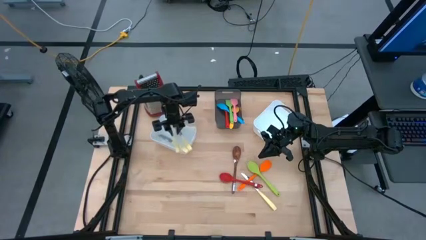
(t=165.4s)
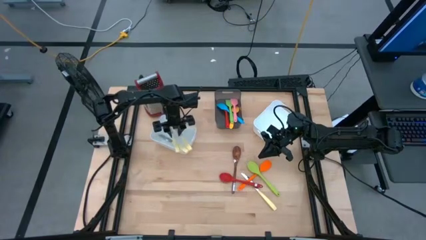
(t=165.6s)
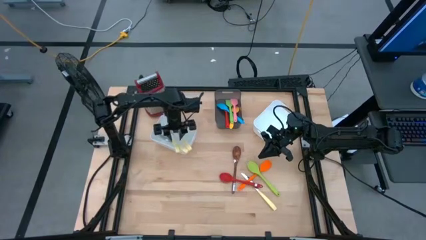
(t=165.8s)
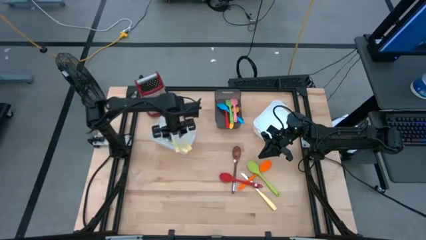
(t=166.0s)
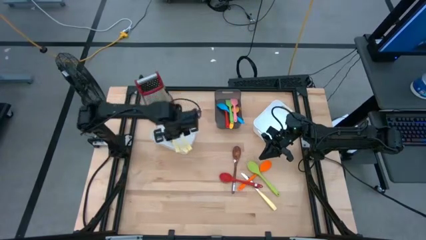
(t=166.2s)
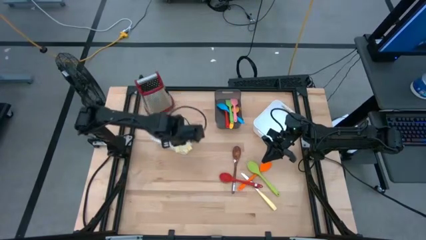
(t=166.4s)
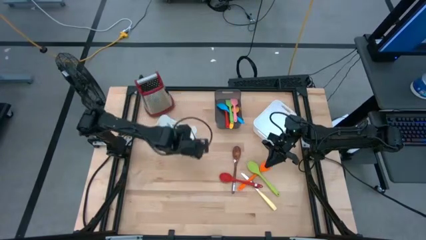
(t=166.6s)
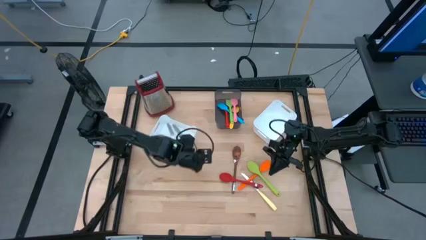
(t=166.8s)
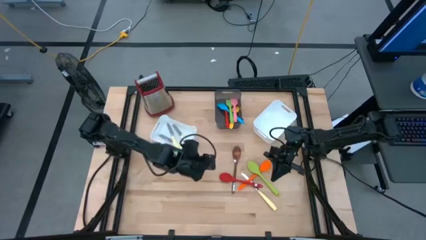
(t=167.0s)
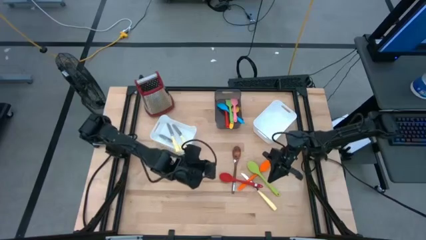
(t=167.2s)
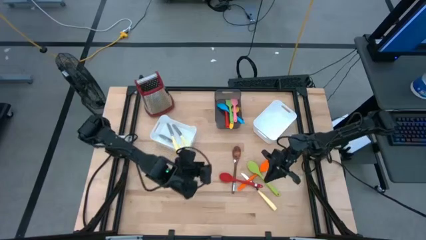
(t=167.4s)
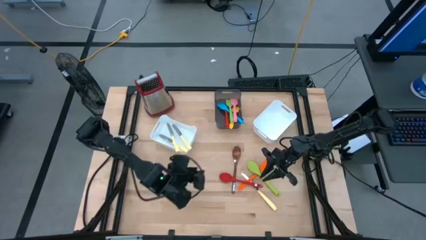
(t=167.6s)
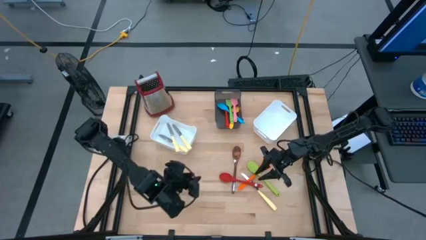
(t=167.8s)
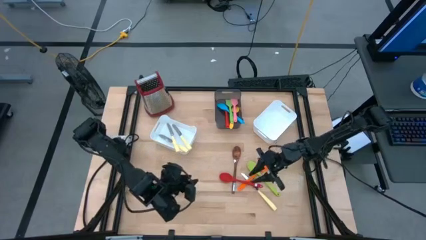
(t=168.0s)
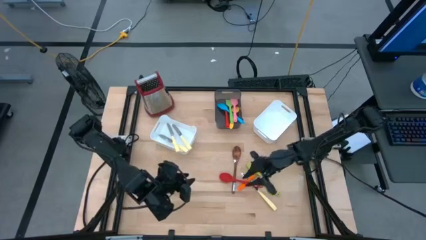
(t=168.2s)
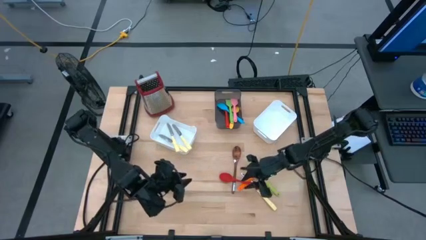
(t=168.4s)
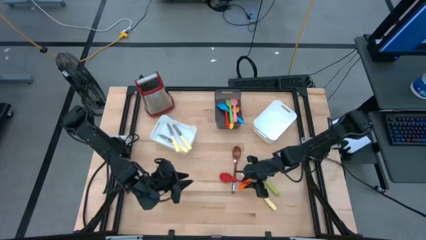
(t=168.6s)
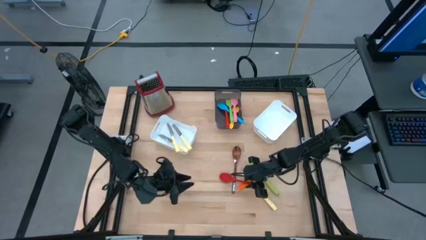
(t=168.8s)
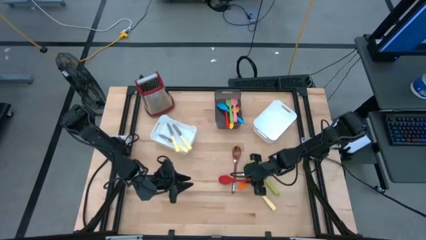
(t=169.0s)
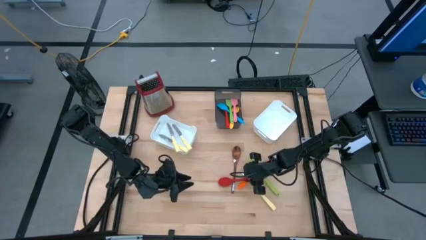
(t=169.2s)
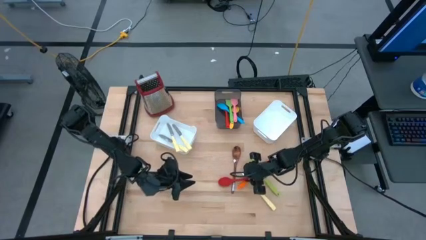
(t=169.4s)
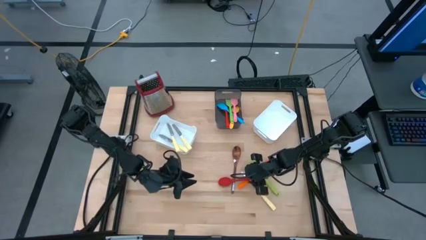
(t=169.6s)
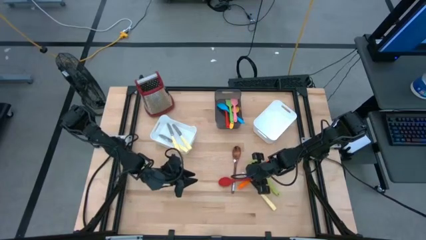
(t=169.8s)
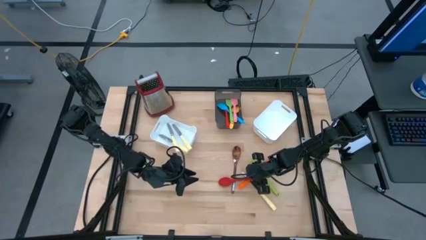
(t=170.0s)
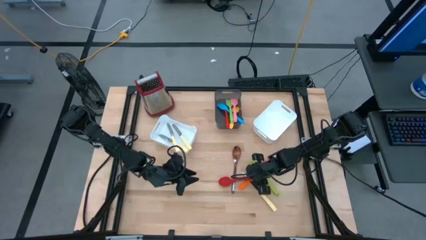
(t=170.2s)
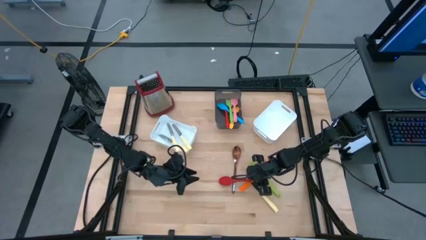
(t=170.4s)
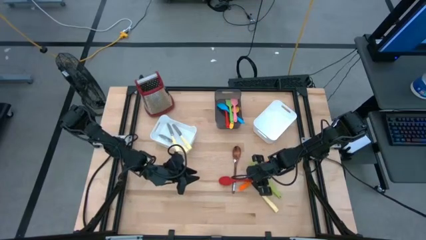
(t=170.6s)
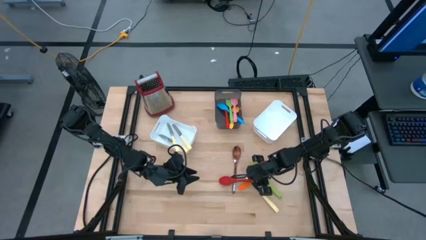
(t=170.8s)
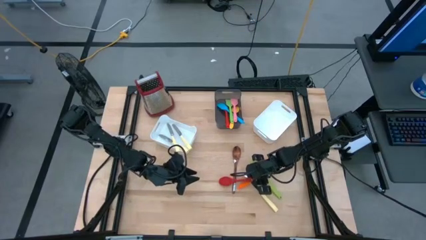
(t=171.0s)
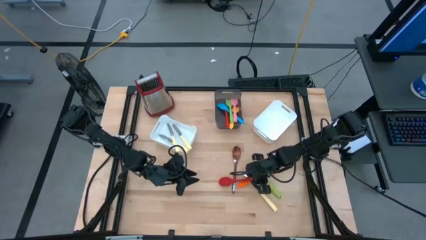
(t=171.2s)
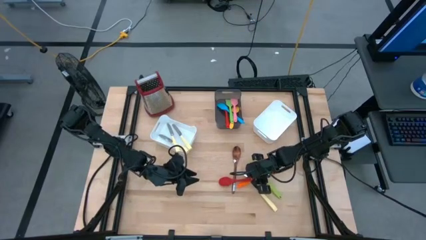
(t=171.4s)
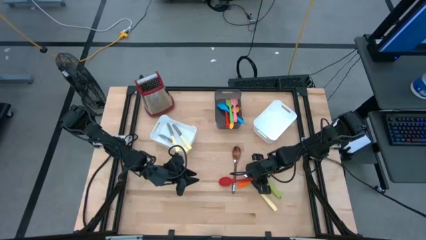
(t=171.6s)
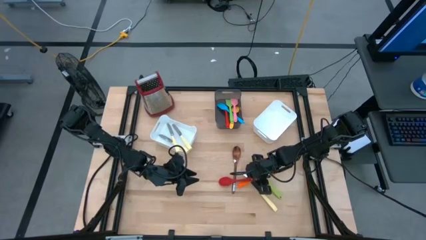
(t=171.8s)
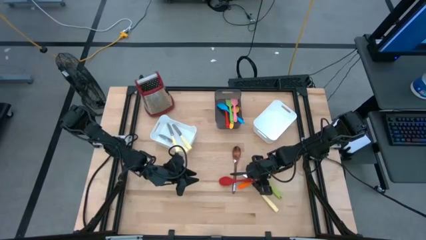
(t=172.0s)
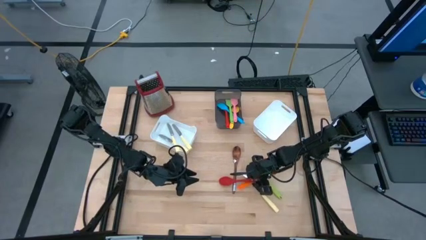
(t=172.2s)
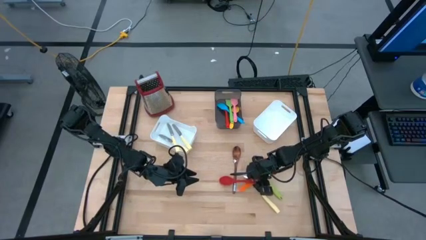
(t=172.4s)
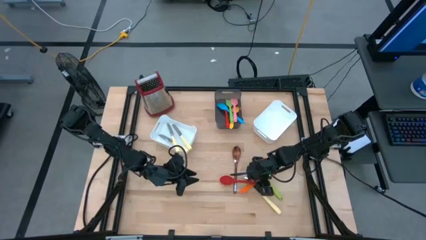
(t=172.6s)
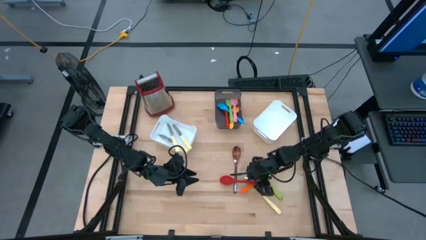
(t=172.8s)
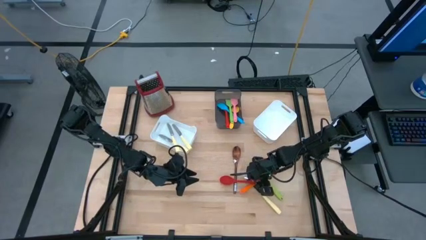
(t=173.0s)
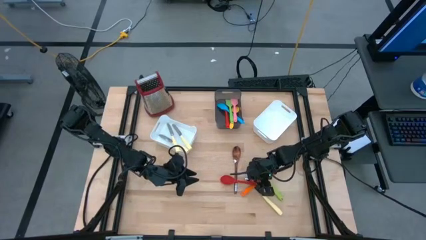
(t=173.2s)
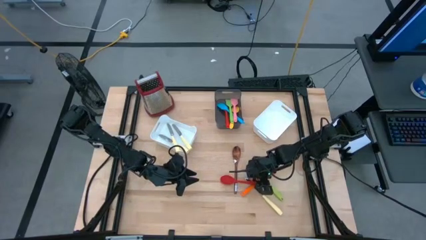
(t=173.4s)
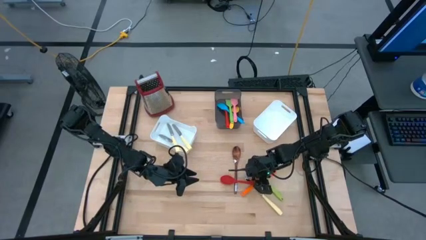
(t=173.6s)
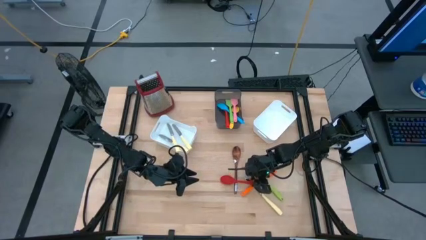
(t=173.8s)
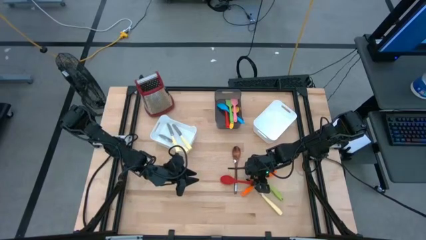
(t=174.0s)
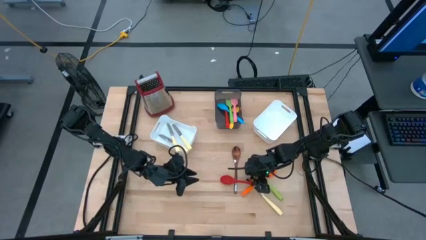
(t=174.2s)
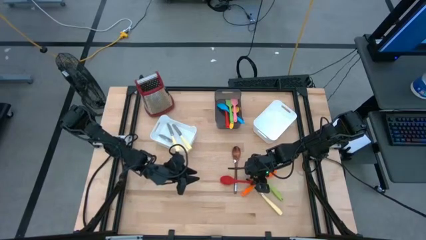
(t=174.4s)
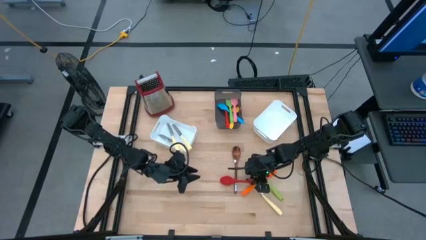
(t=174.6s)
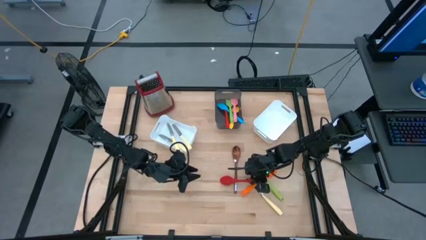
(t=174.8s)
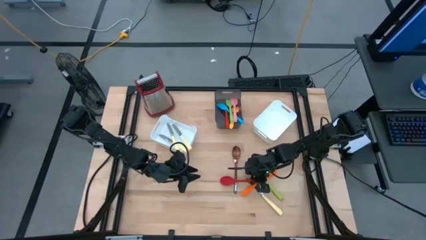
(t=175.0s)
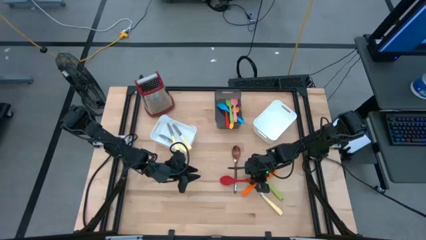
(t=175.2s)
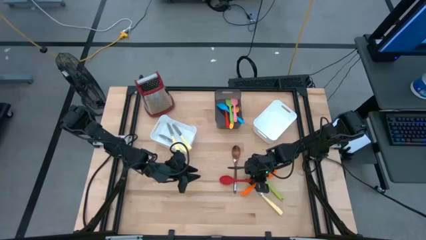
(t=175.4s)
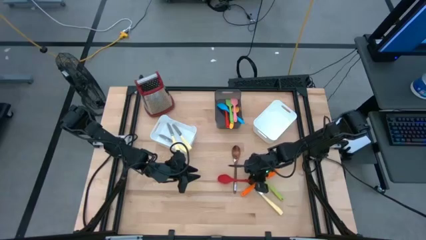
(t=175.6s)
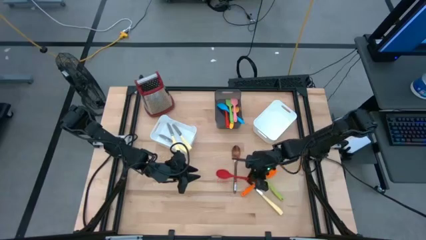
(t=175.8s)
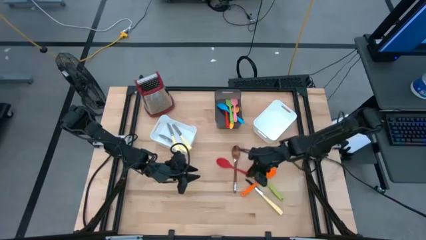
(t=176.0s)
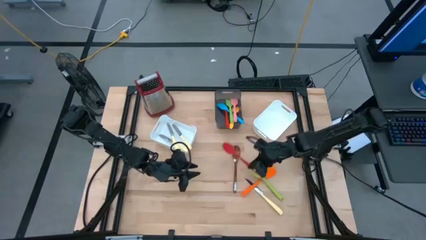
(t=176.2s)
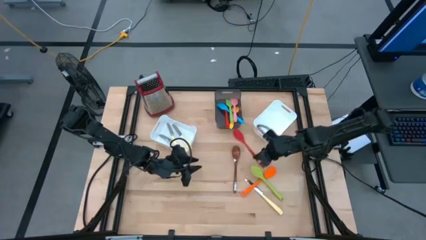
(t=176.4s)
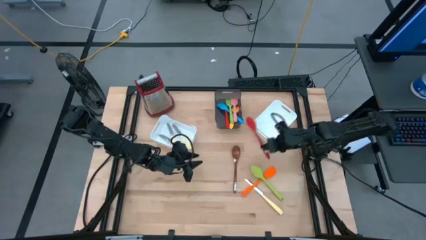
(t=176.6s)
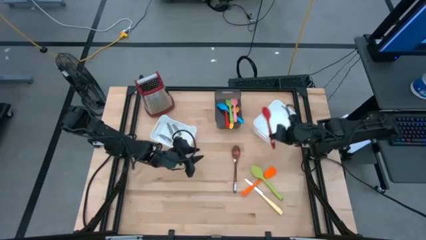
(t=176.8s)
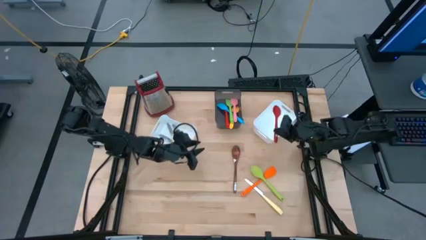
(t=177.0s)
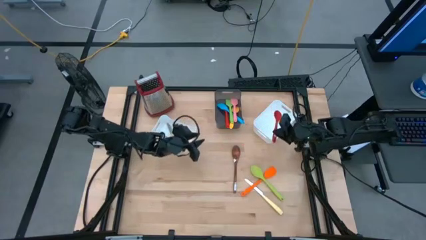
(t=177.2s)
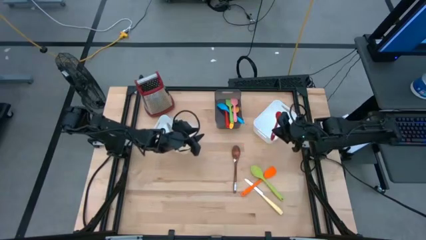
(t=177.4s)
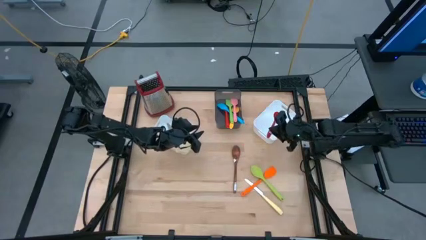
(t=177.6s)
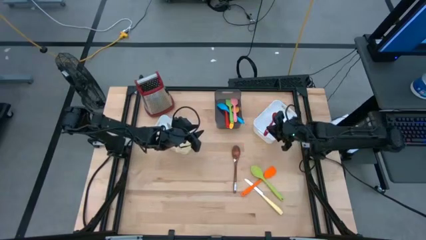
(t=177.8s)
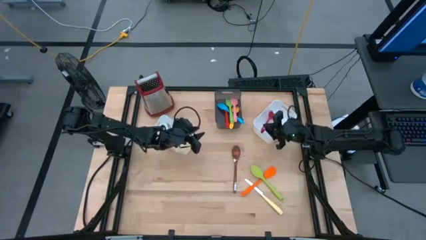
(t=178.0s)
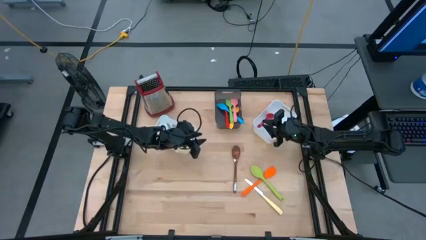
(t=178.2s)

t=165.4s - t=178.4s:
Task: Pick & Place Kitchen Items
Put the red slotted spoon into the right white bin
